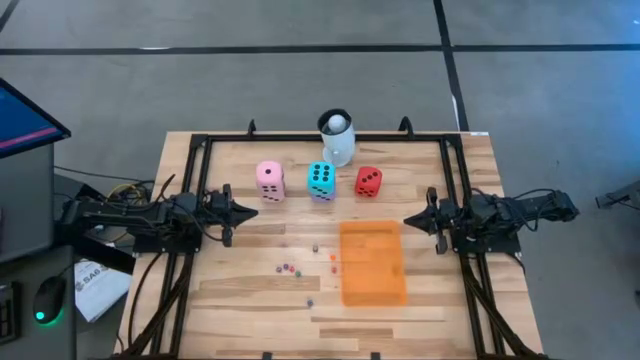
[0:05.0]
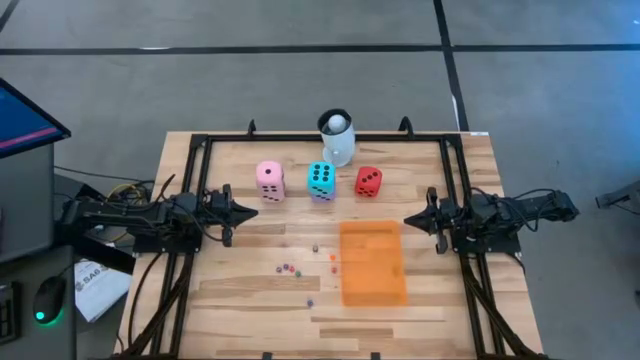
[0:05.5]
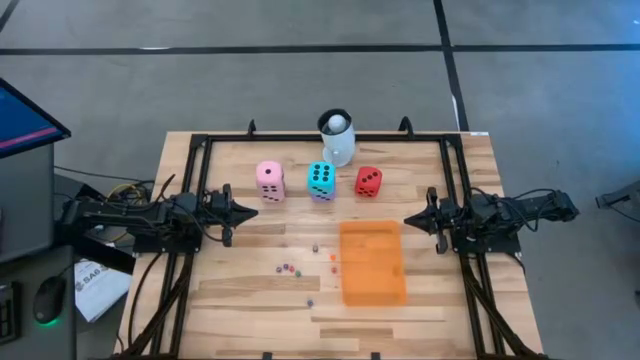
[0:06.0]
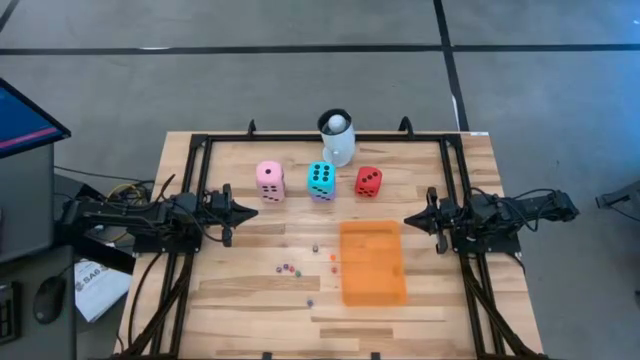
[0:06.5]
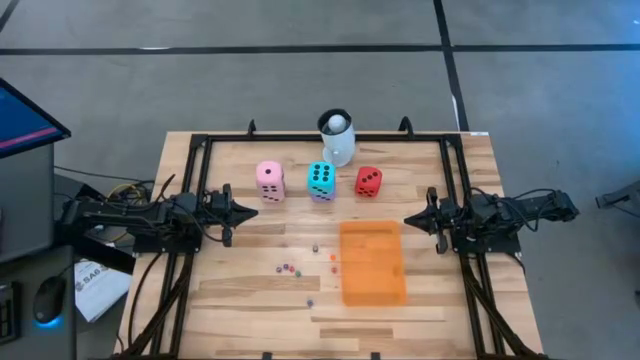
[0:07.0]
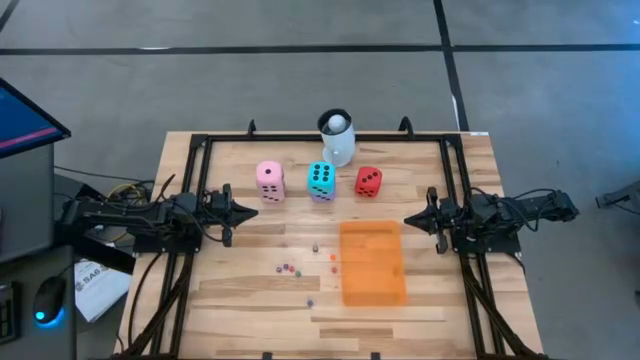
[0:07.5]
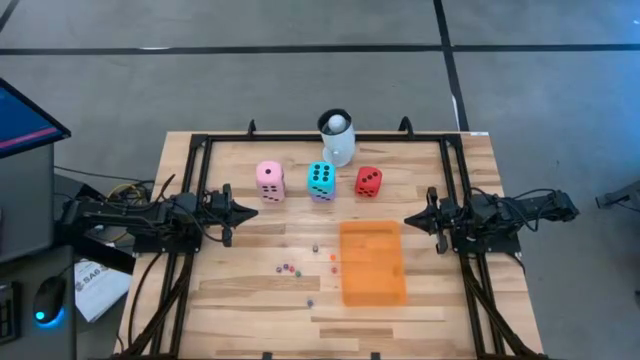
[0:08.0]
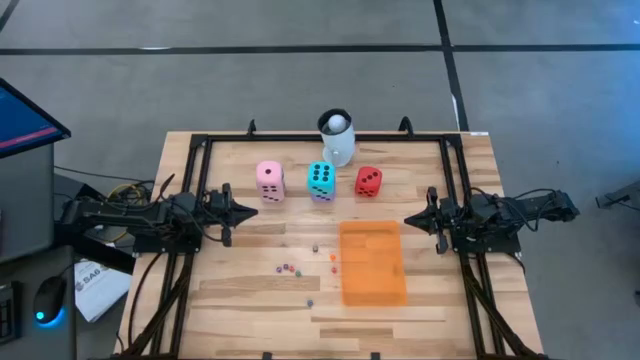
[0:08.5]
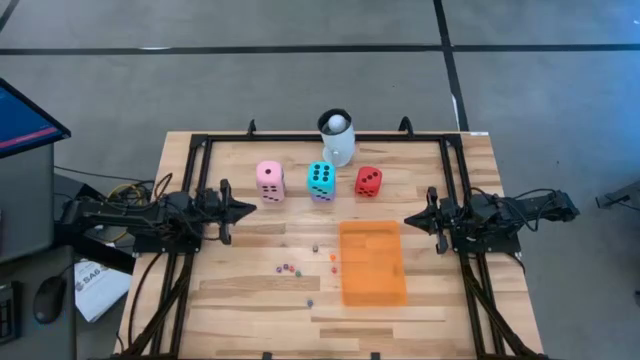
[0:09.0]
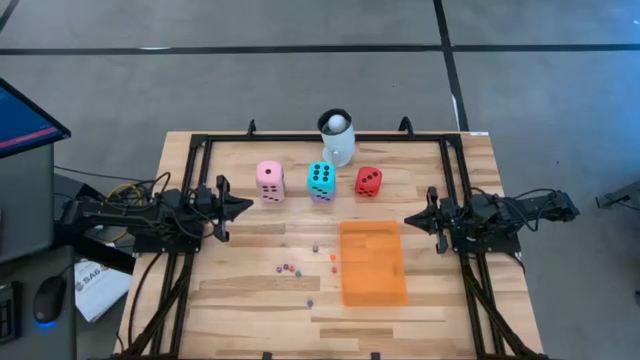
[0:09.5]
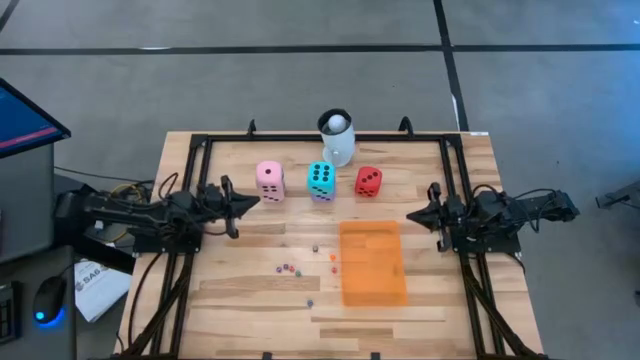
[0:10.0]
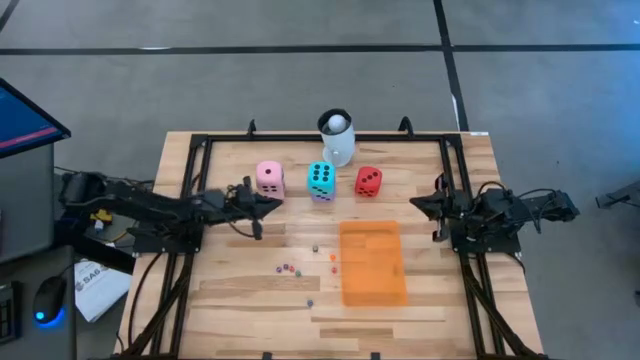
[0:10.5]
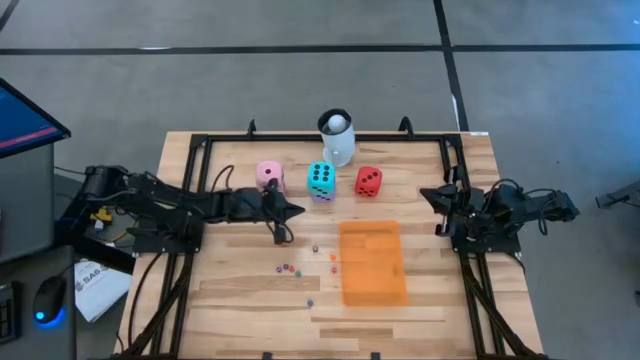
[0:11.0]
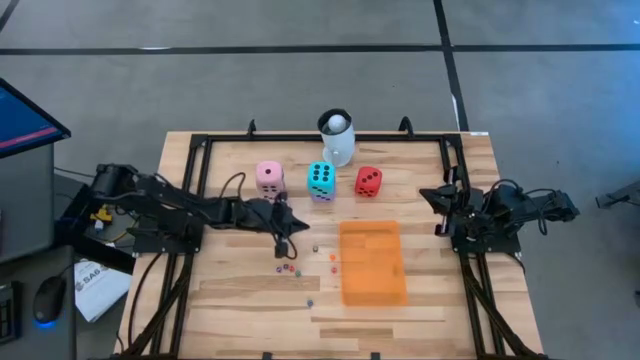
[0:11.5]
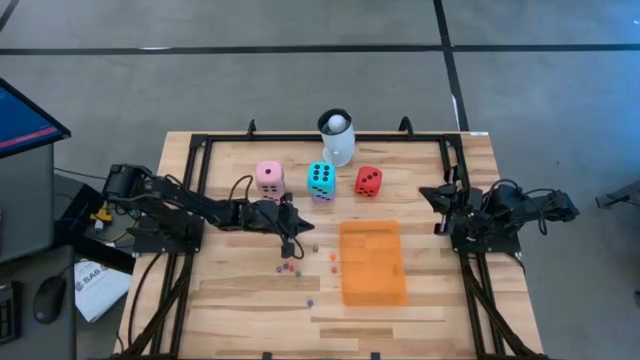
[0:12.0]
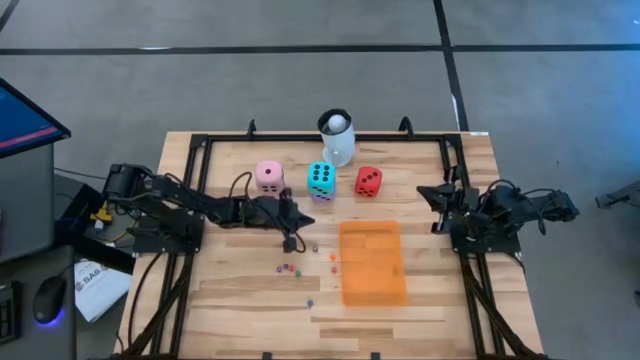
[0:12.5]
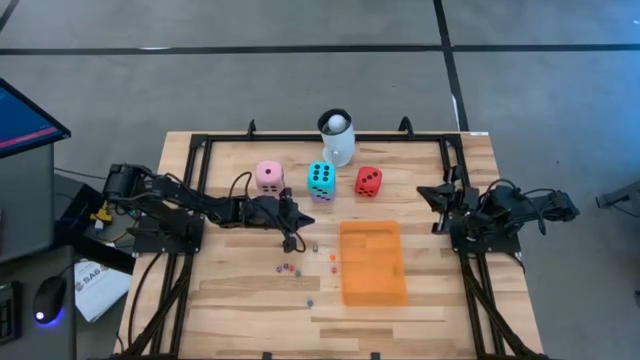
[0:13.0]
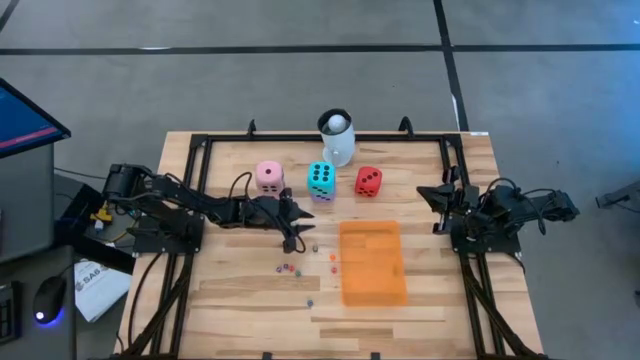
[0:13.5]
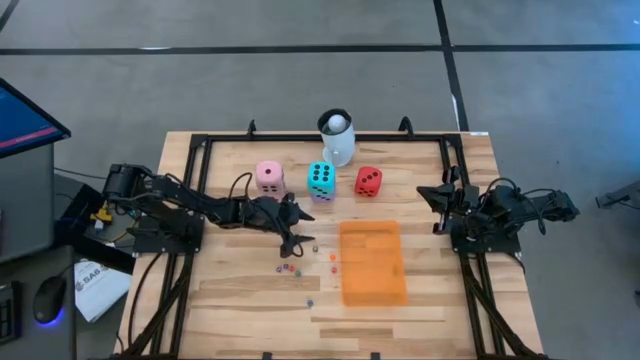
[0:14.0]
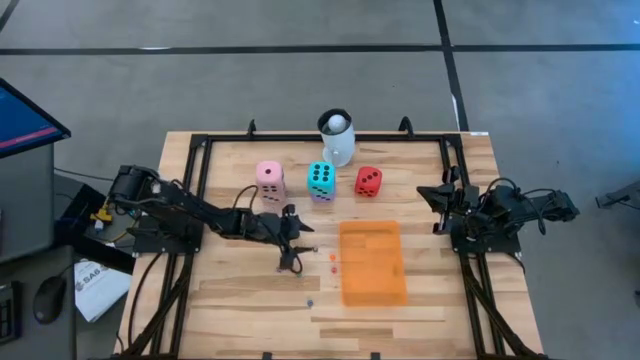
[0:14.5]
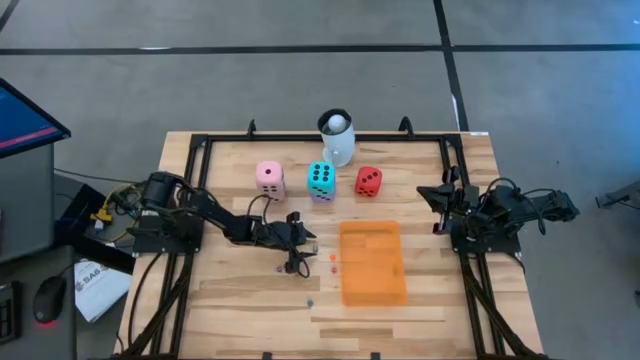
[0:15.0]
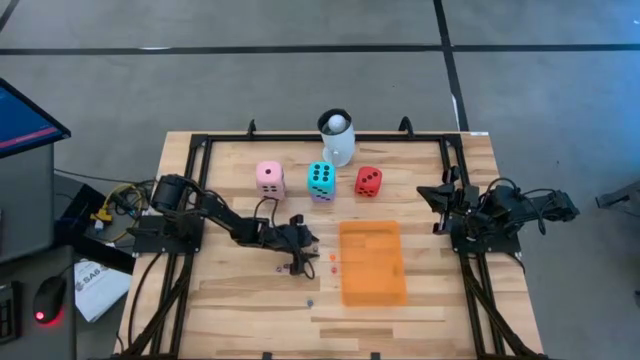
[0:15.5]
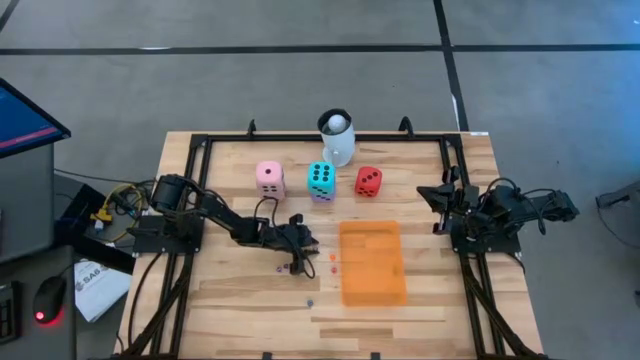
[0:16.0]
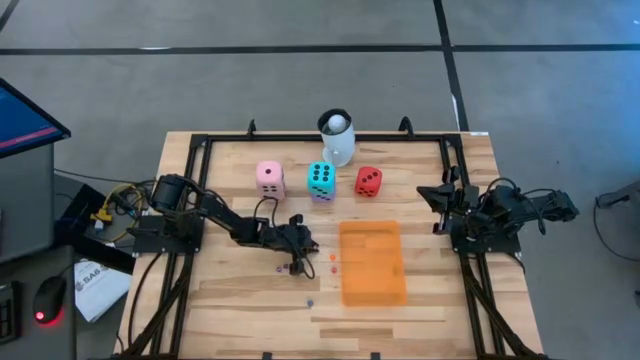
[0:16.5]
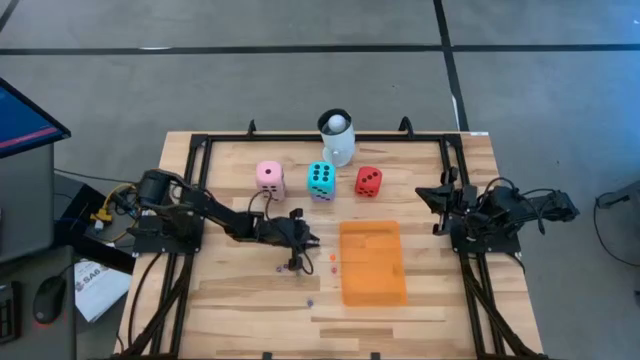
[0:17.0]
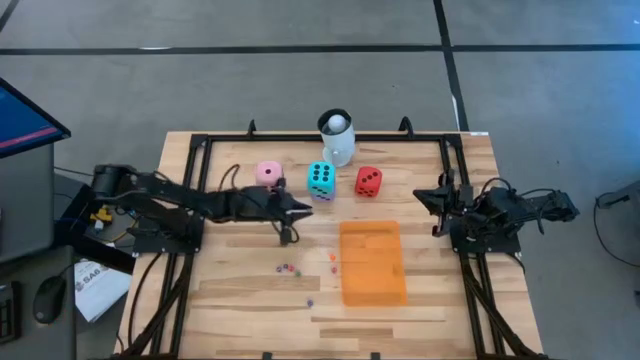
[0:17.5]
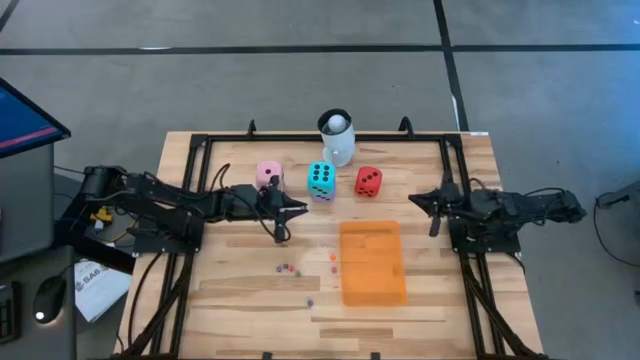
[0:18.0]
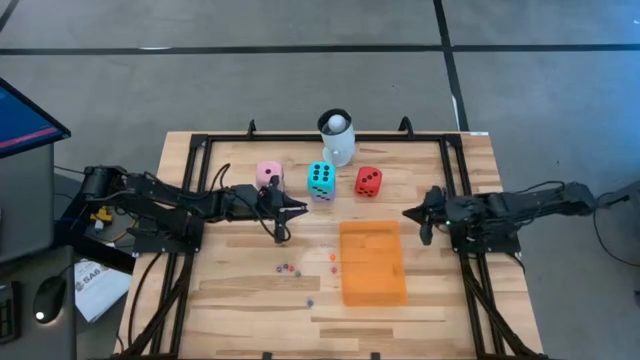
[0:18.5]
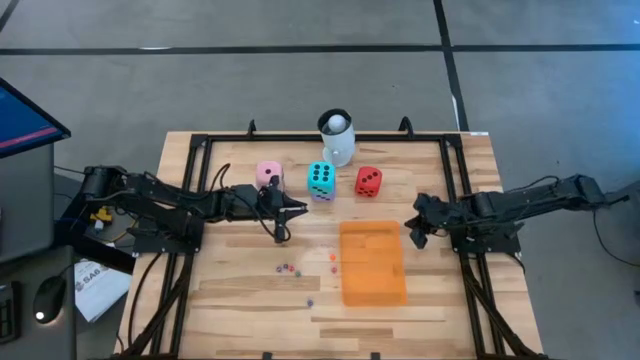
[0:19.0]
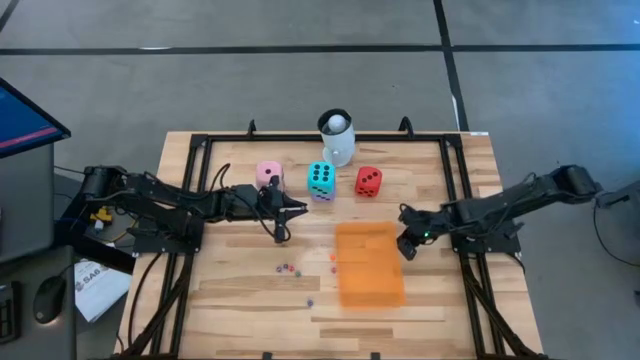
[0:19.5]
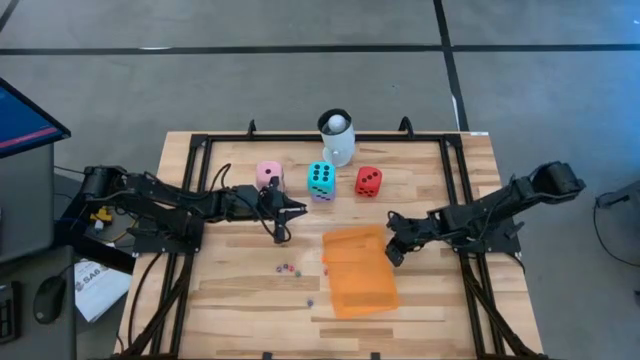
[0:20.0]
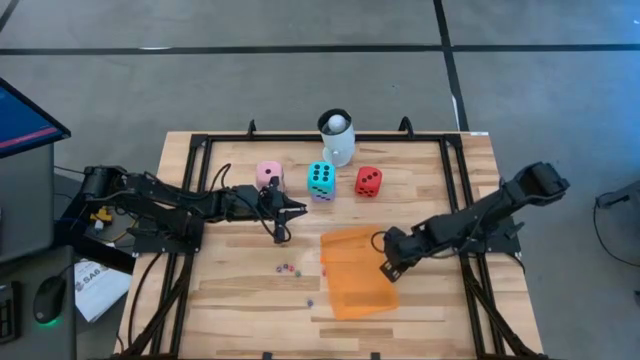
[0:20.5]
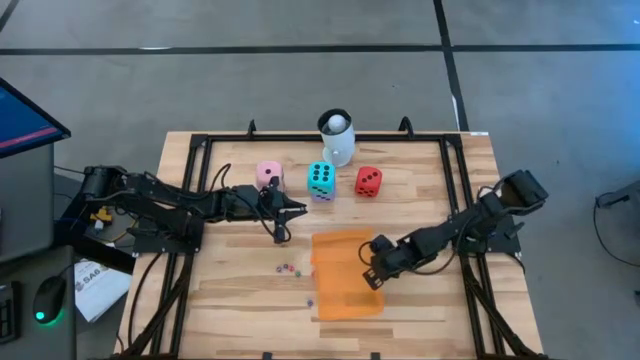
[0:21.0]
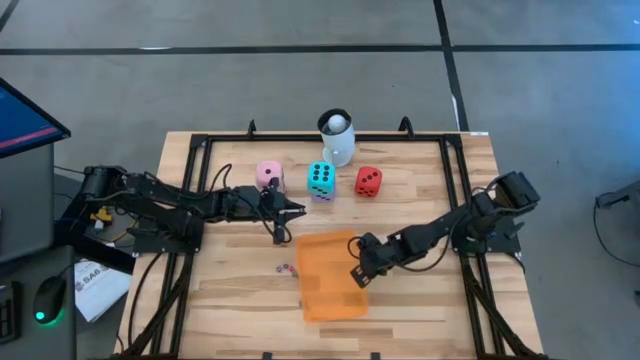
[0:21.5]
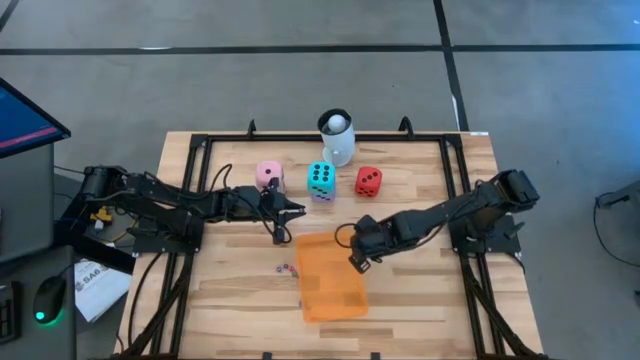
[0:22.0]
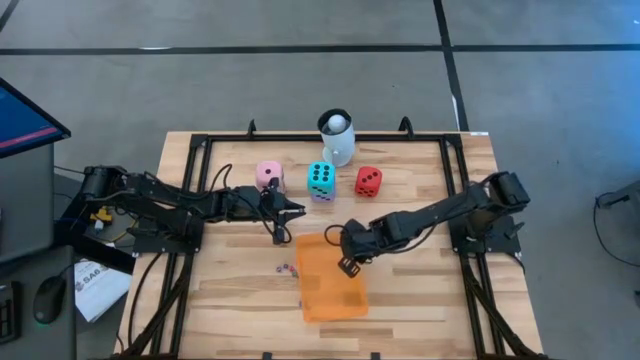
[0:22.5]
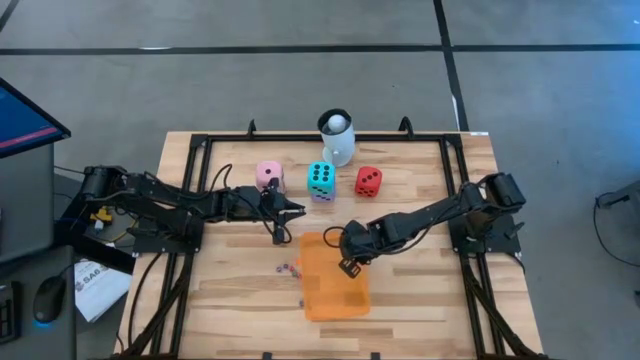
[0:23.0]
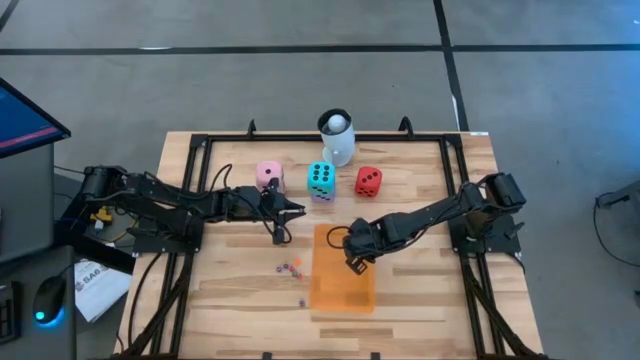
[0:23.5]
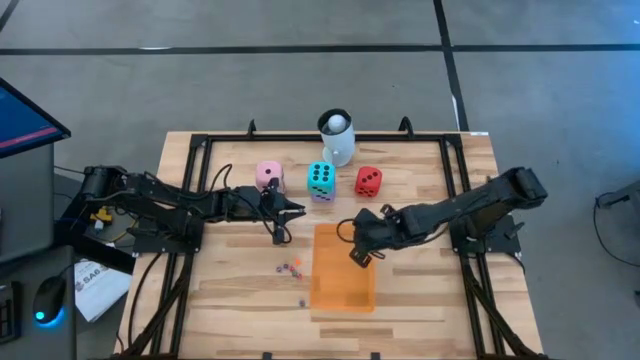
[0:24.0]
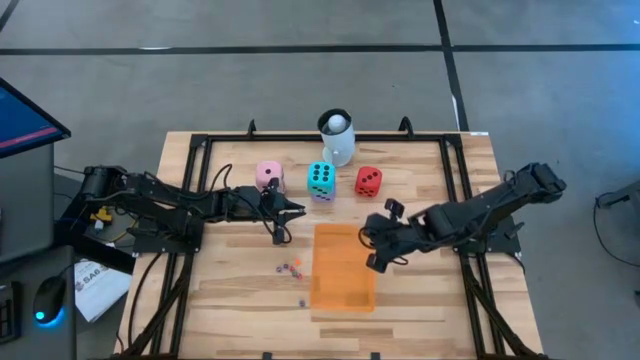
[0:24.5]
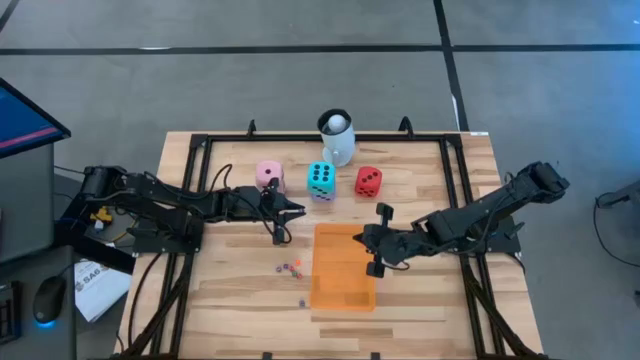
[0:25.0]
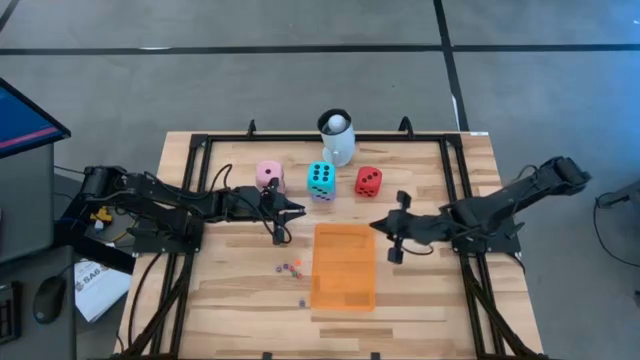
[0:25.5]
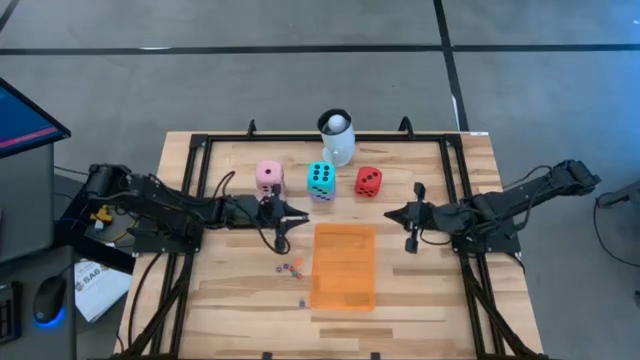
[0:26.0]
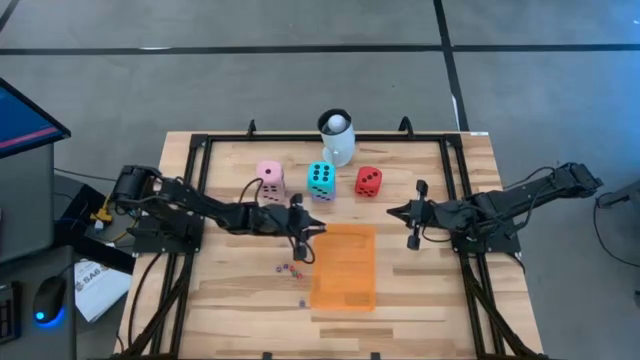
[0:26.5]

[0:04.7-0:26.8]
Task: Pick & Place Dice
Put the small black dice into the orange bin
